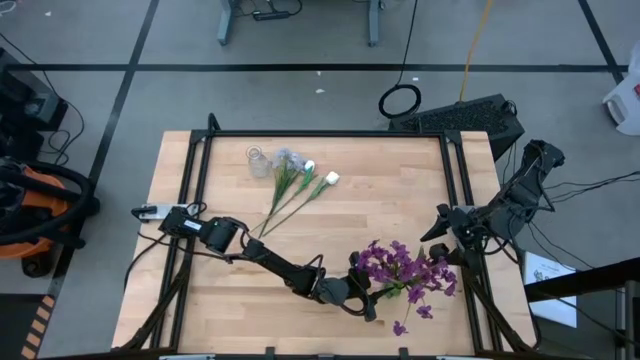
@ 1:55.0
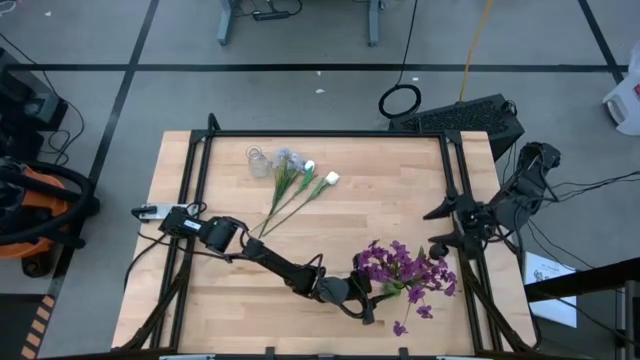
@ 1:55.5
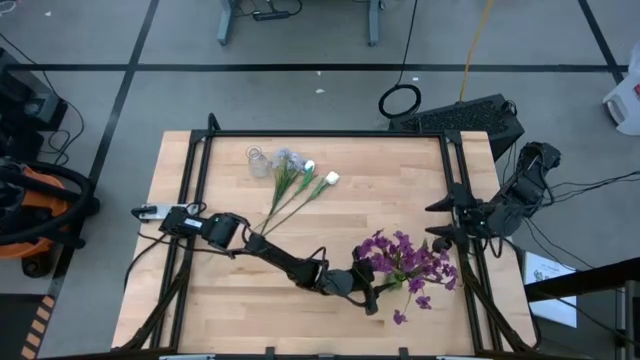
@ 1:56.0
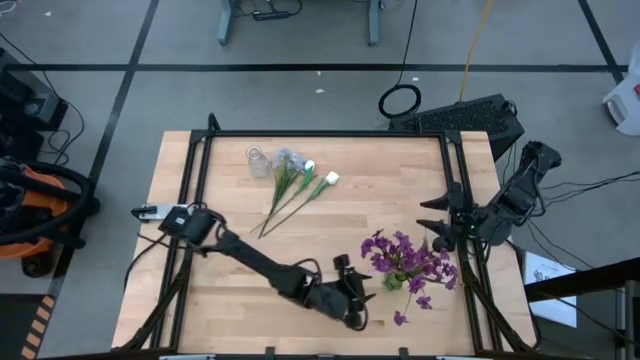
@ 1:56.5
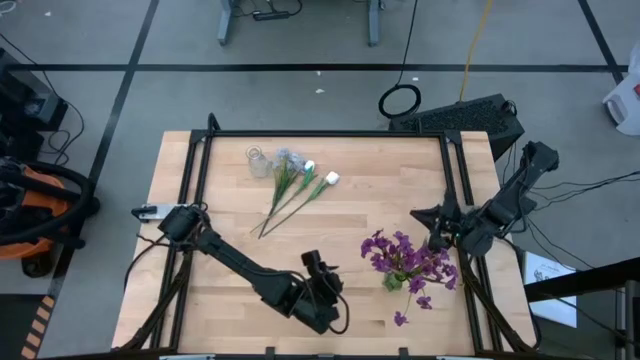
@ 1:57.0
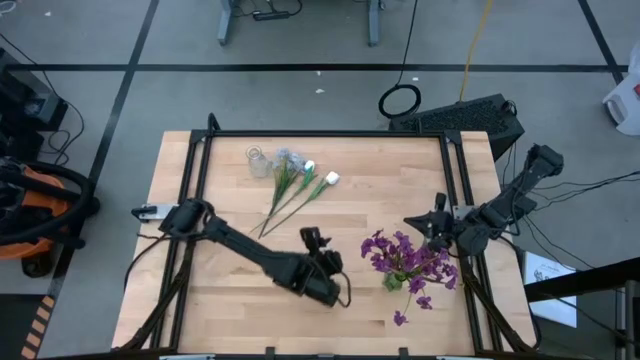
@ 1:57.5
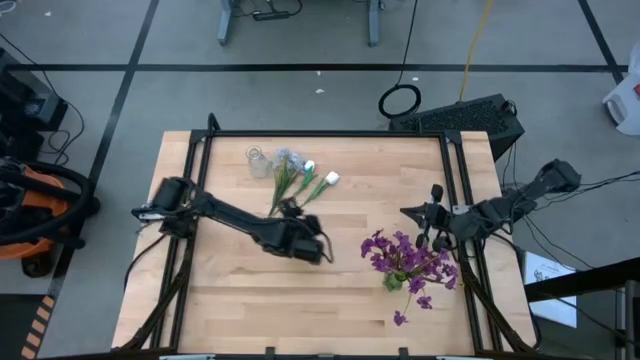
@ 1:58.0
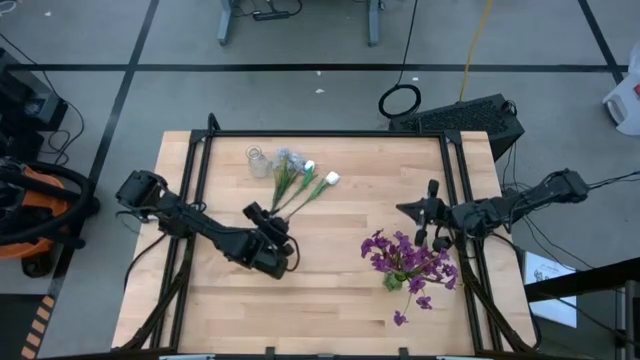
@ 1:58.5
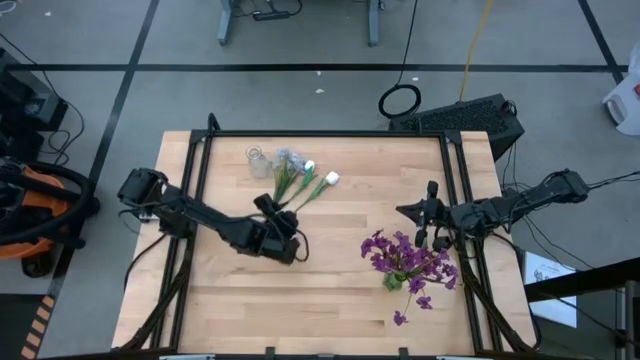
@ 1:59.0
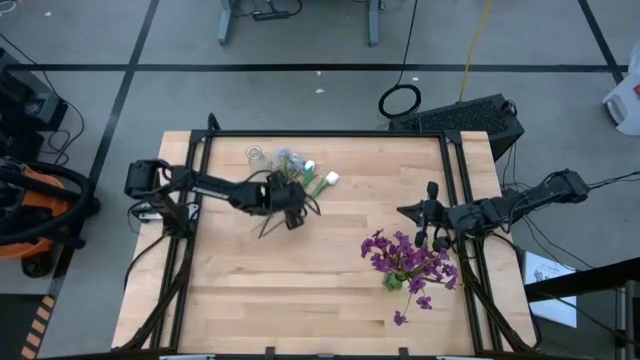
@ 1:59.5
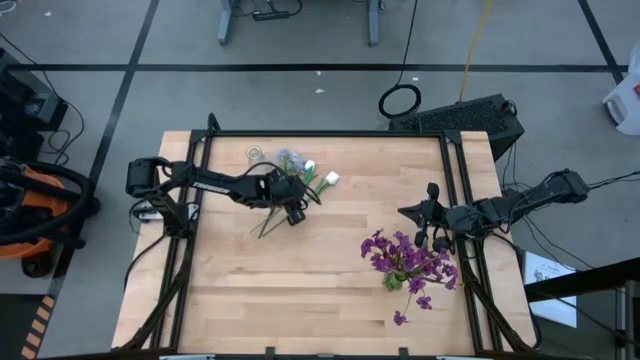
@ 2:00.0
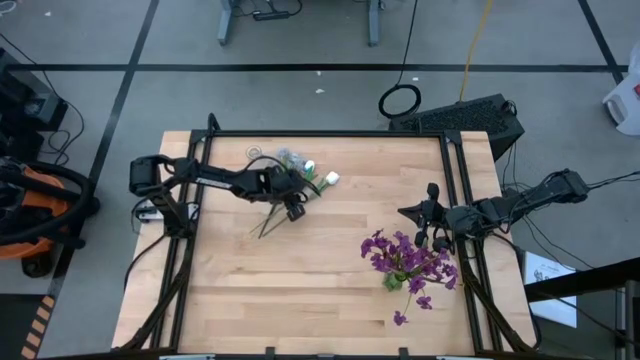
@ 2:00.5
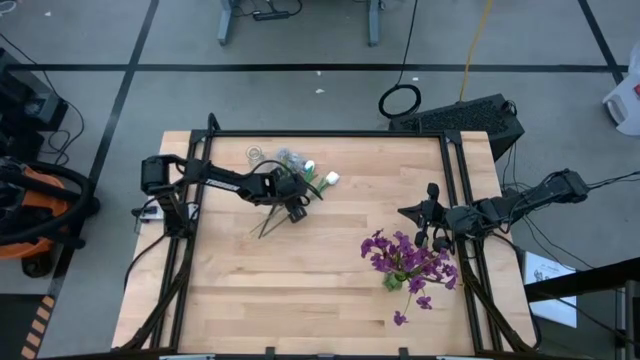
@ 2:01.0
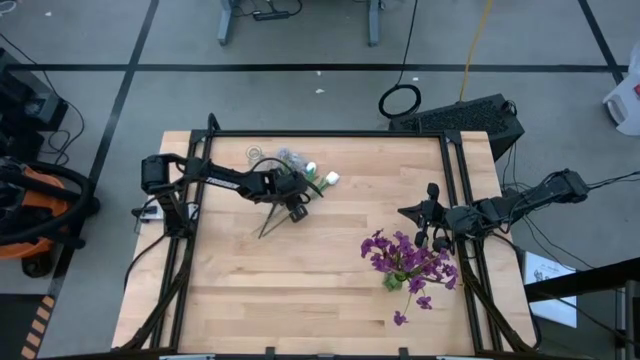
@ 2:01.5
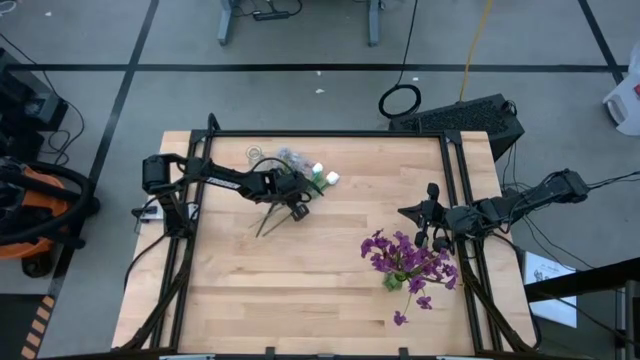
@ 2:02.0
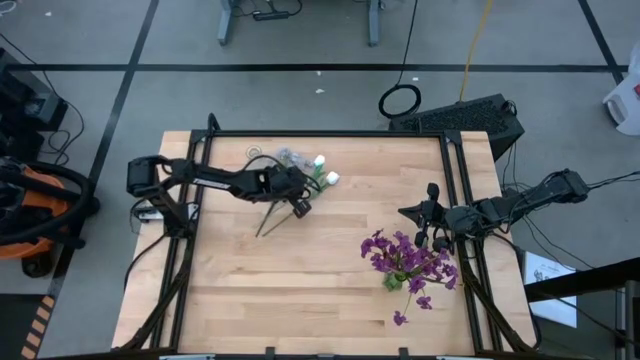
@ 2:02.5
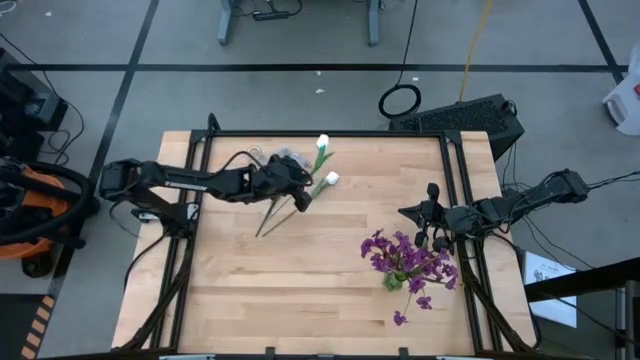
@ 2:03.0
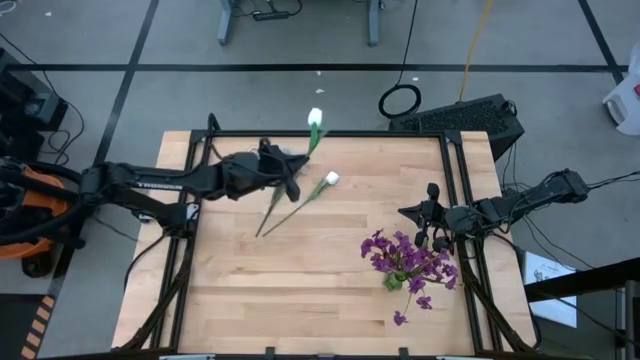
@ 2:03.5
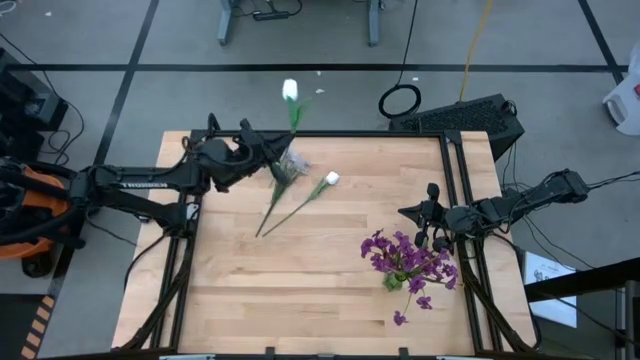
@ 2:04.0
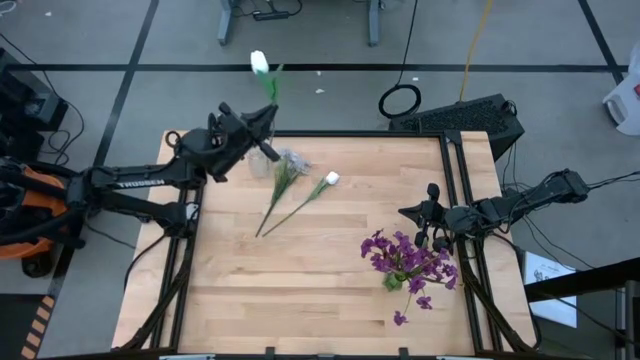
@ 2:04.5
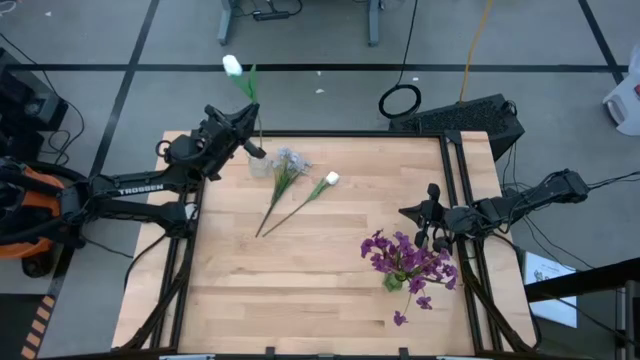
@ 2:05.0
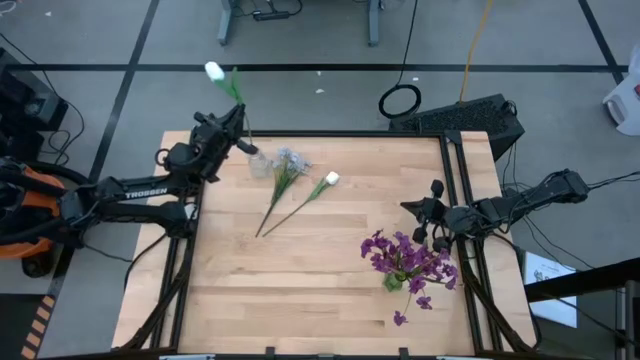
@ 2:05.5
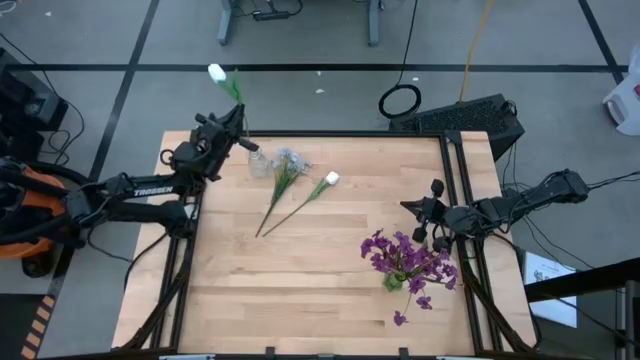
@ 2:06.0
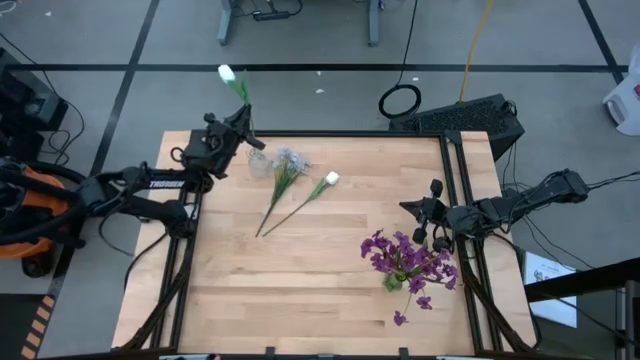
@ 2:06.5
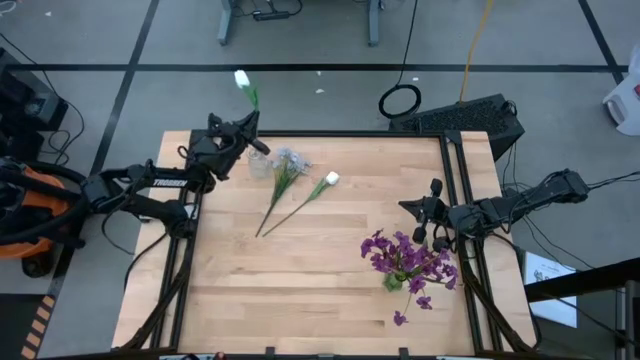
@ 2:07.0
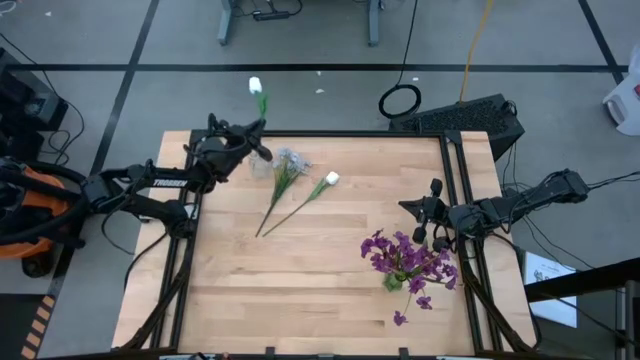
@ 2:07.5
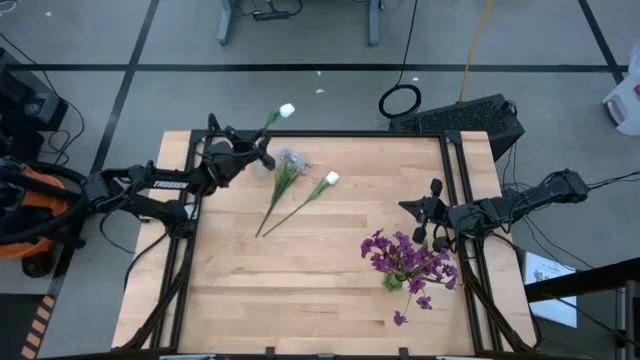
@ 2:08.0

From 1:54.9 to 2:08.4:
Task: Sort flowers into vase by color
Put the left white tulip into the transparent vase

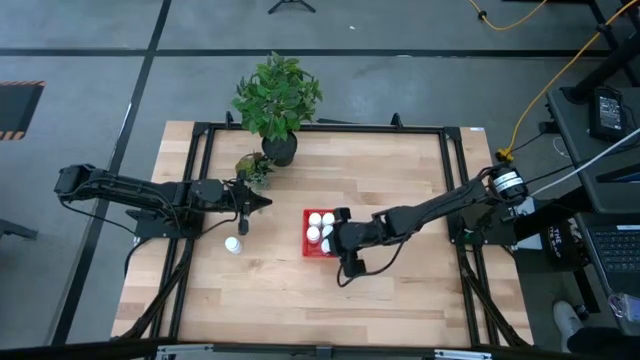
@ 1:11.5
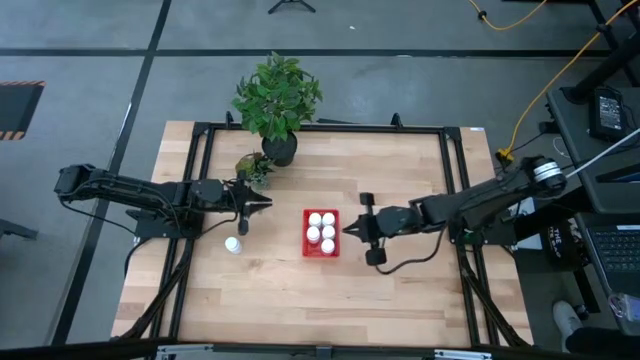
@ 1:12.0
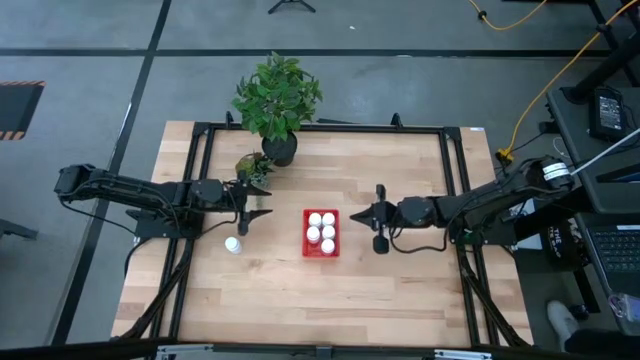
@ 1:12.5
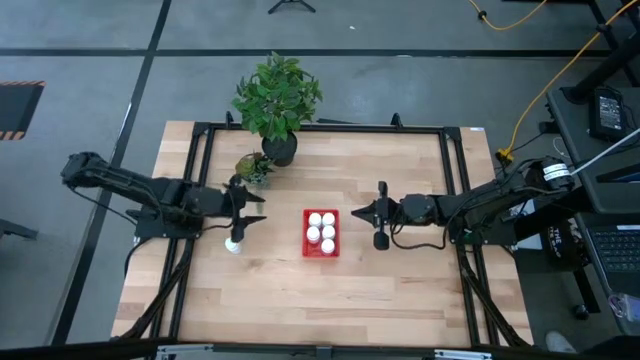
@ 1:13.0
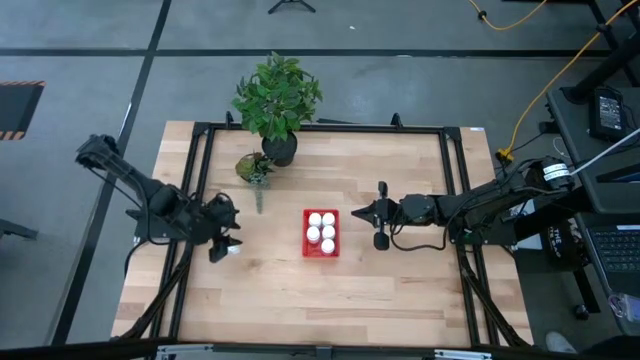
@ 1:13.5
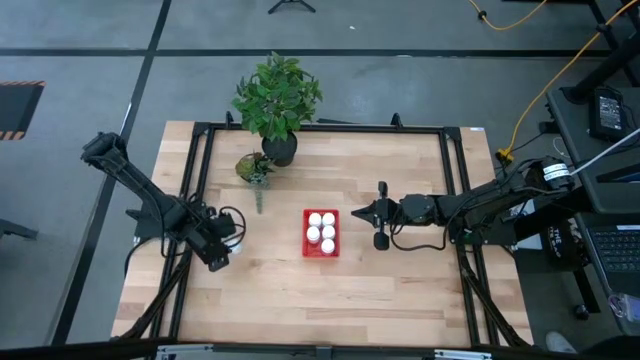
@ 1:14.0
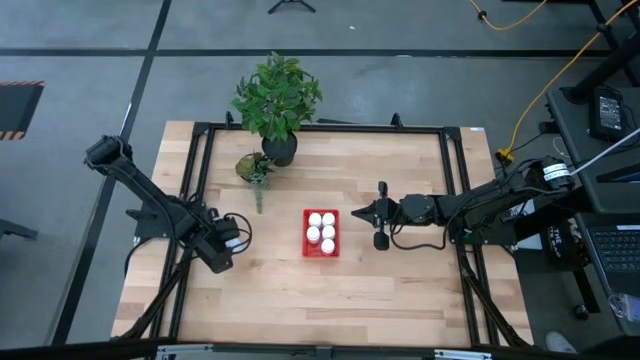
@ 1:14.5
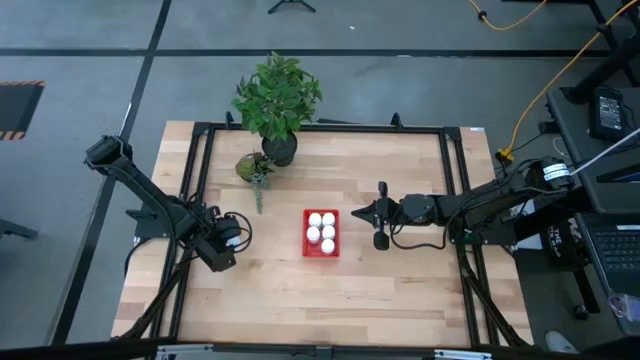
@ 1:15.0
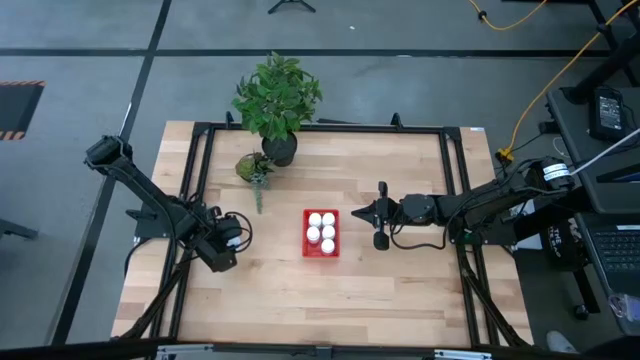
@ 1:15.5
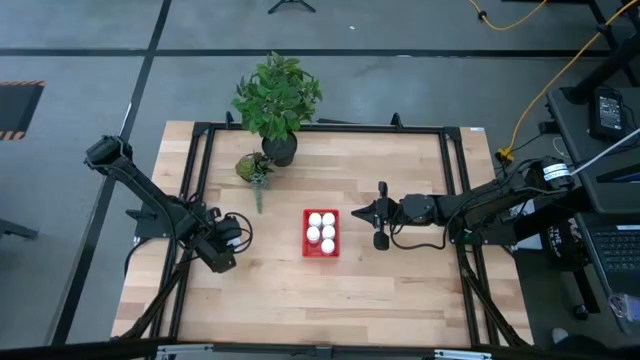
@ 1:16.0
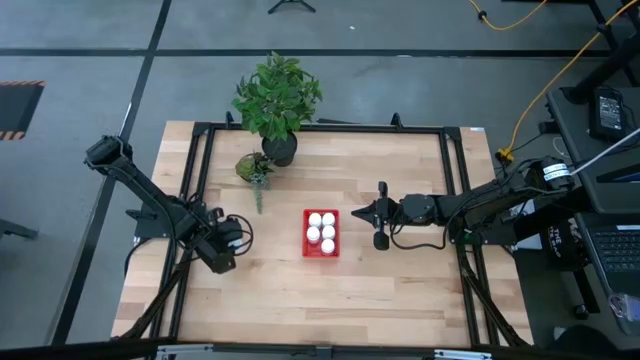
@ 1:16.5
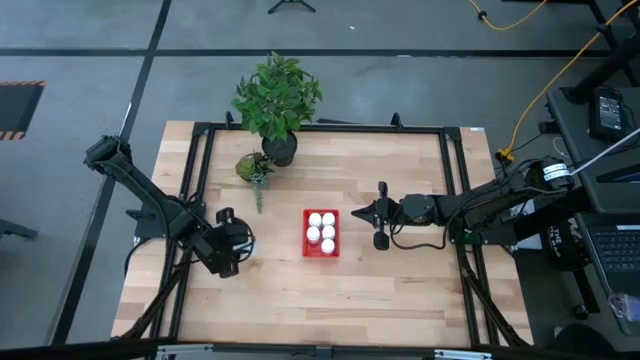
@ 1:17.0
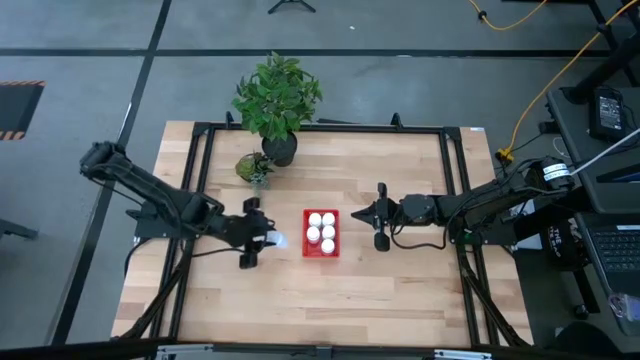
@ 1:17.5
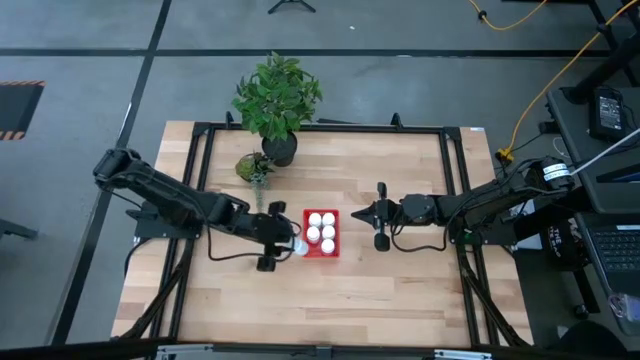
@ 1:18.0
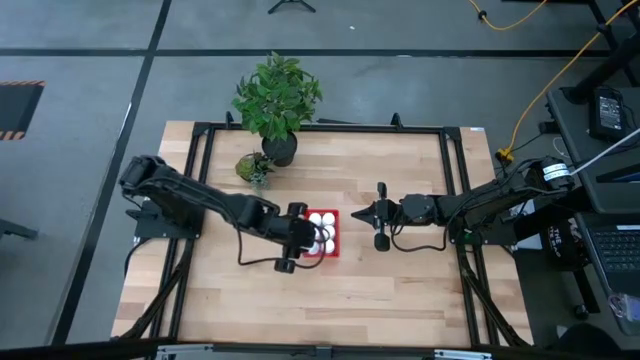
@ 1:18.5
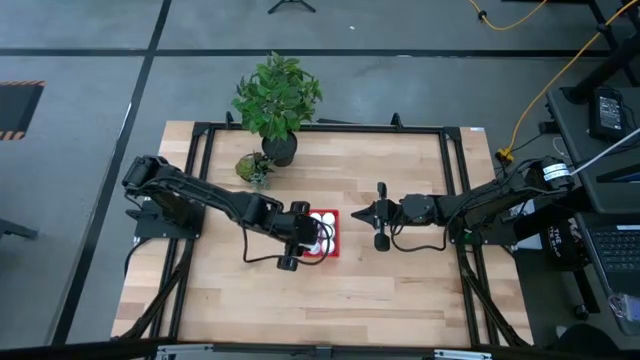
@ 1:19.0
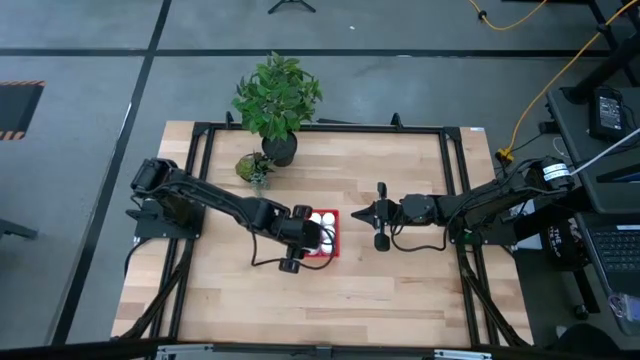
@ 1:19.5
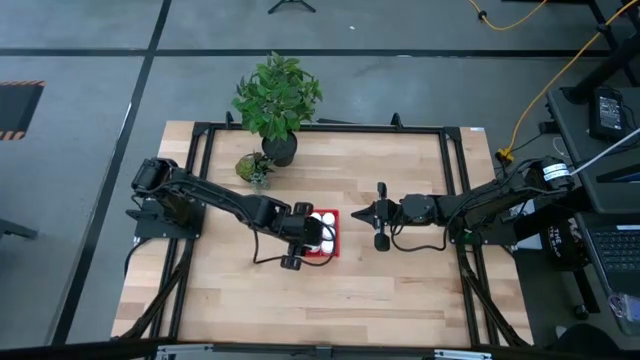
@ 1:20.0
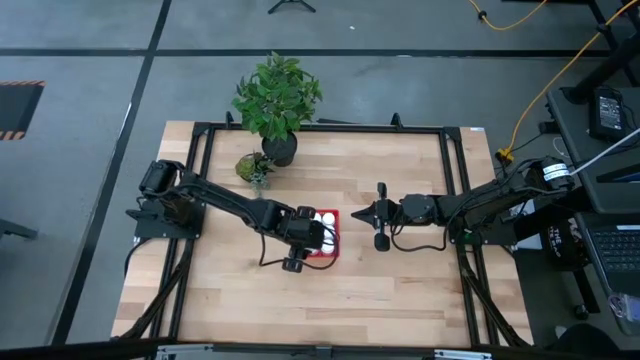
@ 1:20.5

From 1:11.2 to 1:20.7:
Task: Pick and place pill bottles into a basket
Put the white medicine bottle into the red bin
